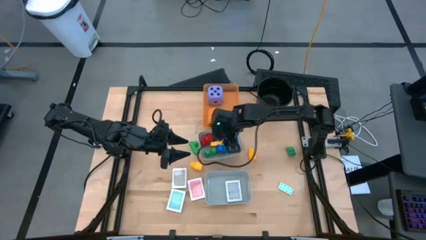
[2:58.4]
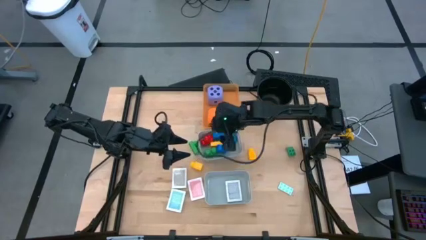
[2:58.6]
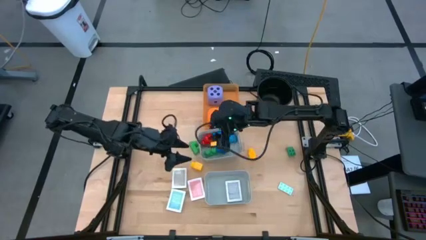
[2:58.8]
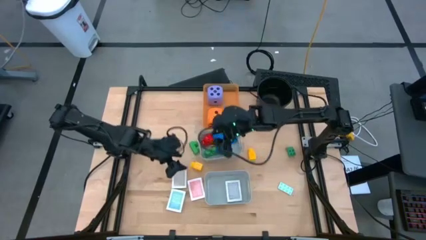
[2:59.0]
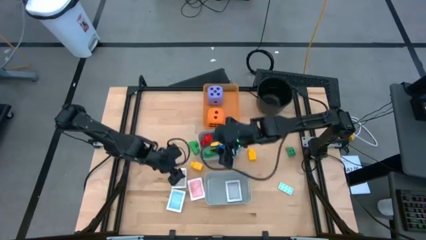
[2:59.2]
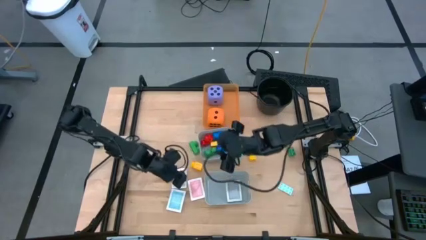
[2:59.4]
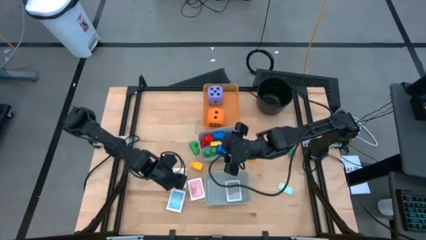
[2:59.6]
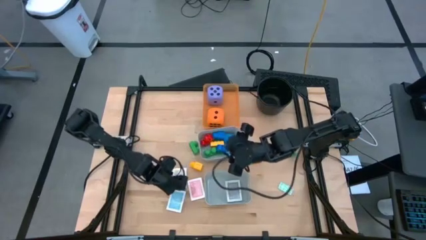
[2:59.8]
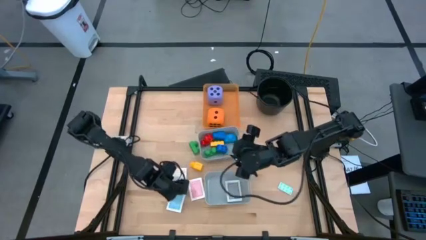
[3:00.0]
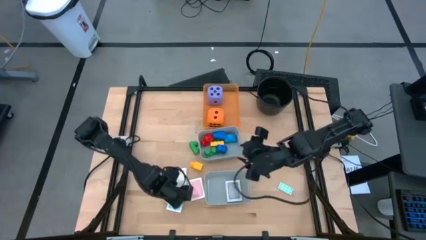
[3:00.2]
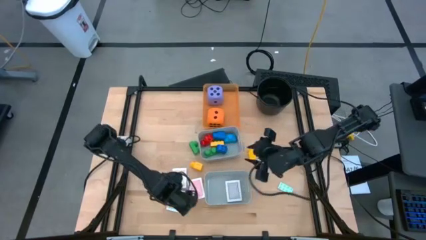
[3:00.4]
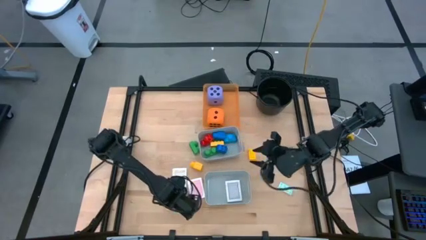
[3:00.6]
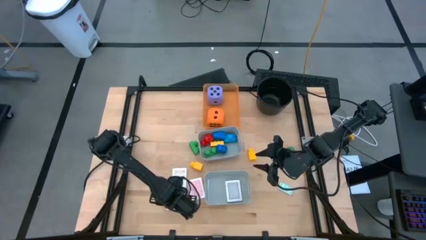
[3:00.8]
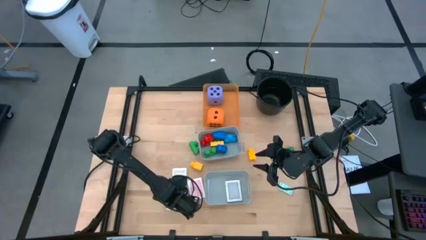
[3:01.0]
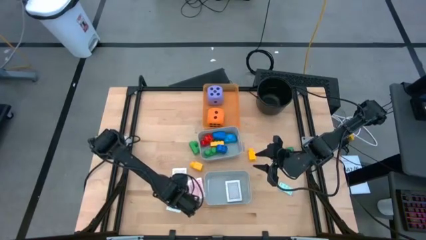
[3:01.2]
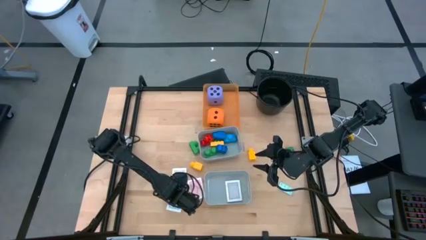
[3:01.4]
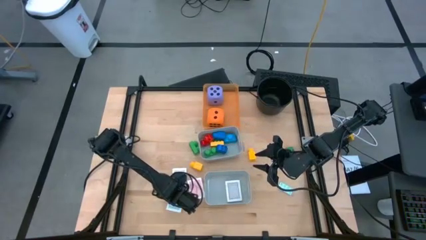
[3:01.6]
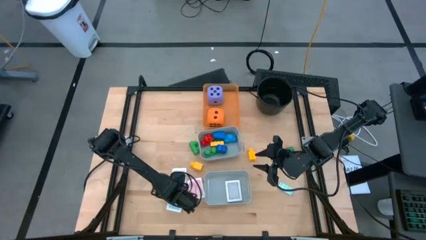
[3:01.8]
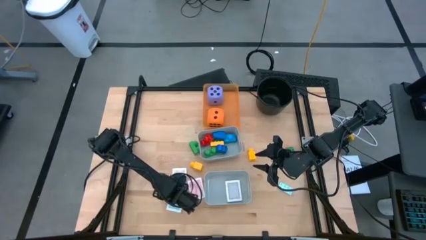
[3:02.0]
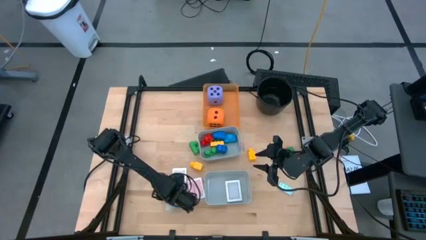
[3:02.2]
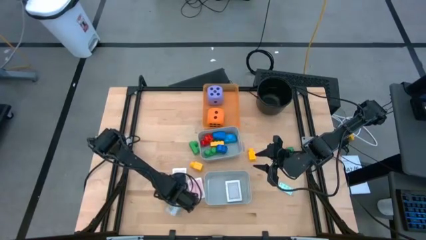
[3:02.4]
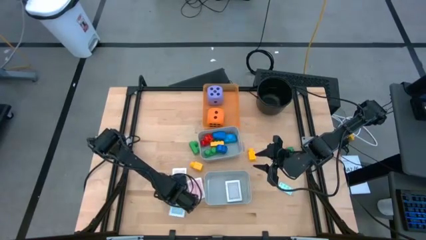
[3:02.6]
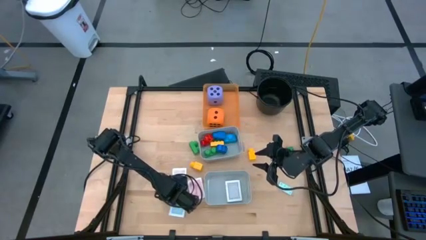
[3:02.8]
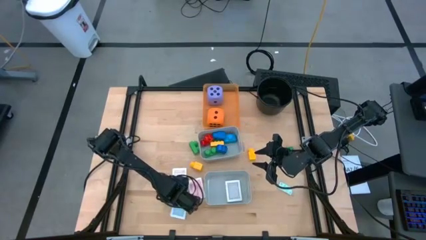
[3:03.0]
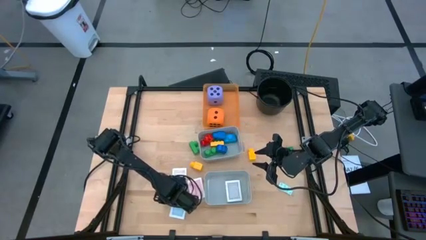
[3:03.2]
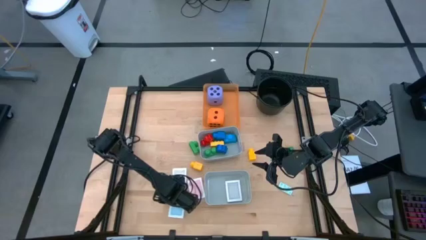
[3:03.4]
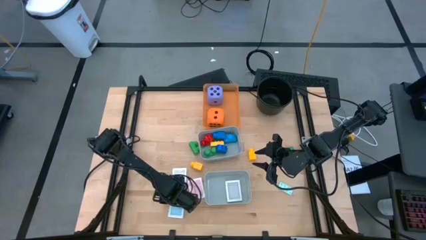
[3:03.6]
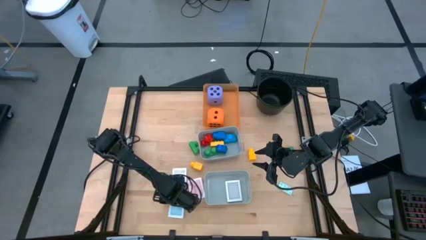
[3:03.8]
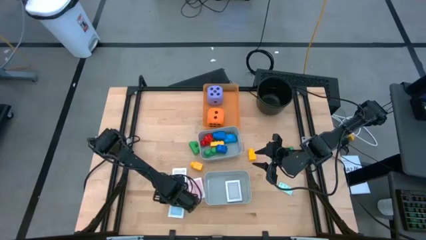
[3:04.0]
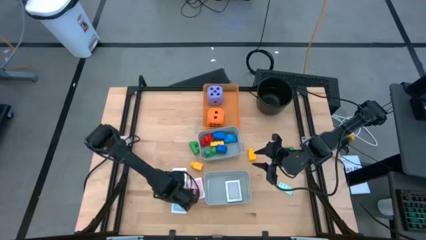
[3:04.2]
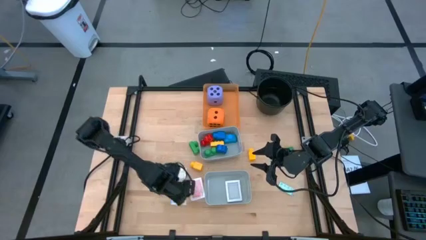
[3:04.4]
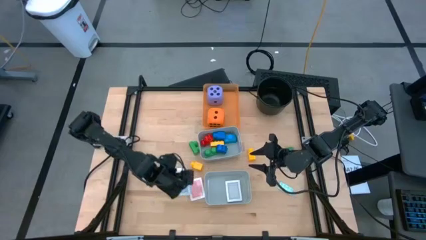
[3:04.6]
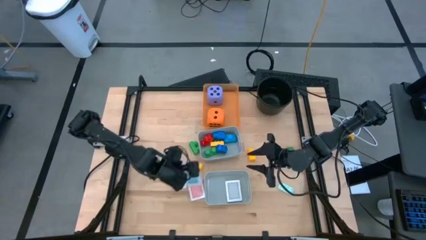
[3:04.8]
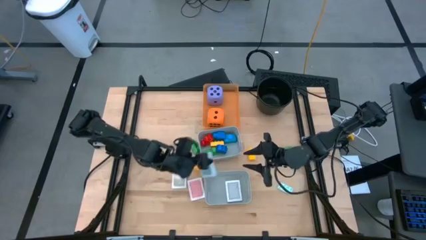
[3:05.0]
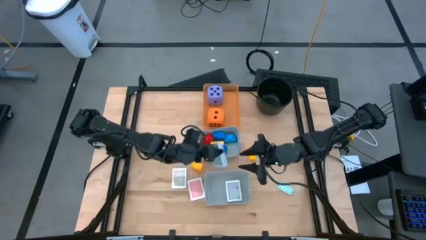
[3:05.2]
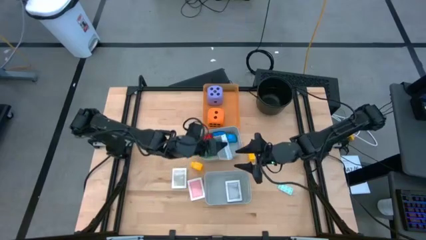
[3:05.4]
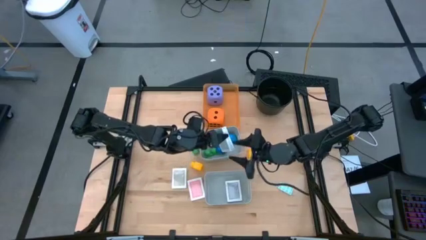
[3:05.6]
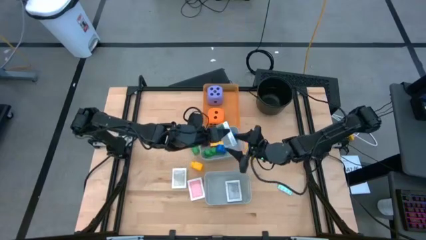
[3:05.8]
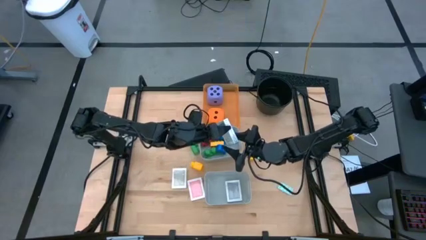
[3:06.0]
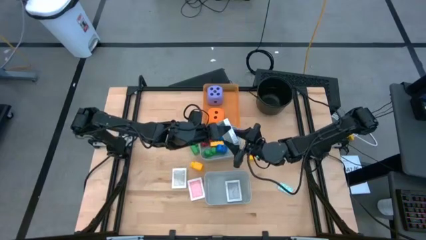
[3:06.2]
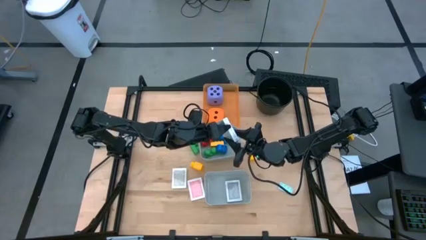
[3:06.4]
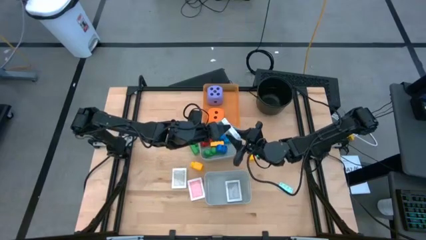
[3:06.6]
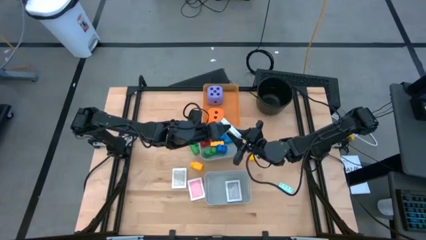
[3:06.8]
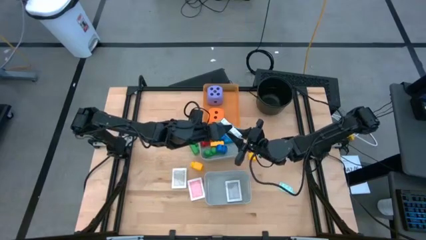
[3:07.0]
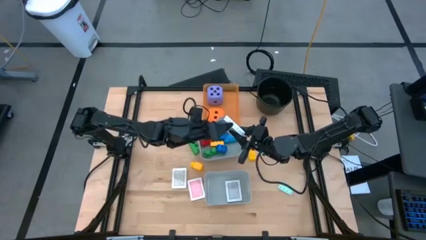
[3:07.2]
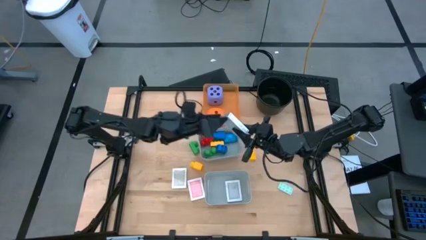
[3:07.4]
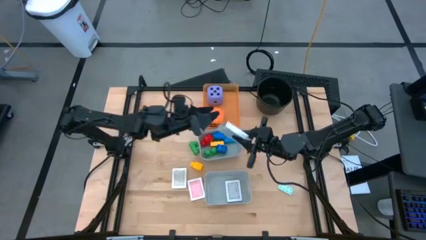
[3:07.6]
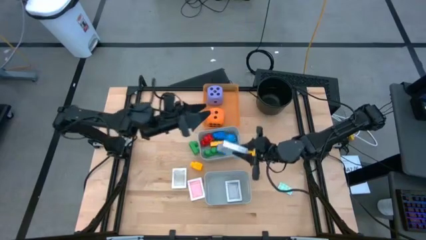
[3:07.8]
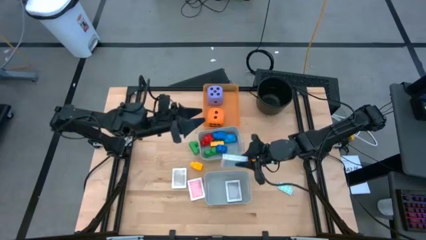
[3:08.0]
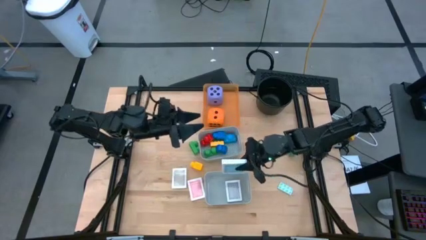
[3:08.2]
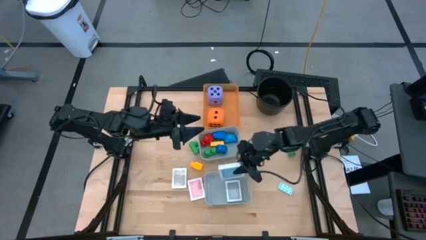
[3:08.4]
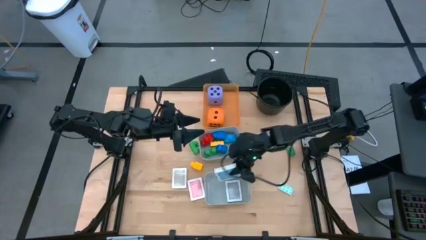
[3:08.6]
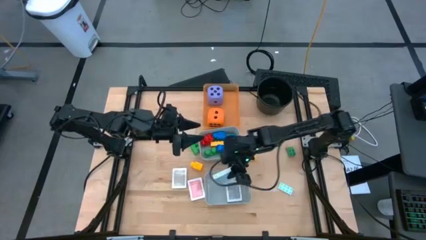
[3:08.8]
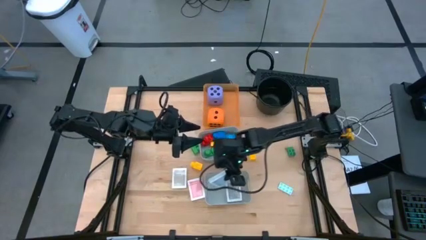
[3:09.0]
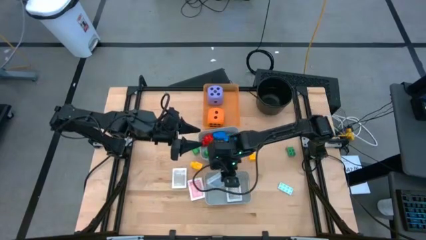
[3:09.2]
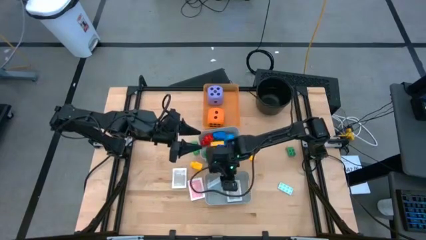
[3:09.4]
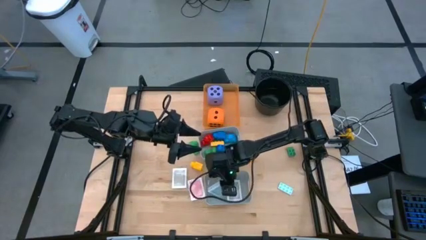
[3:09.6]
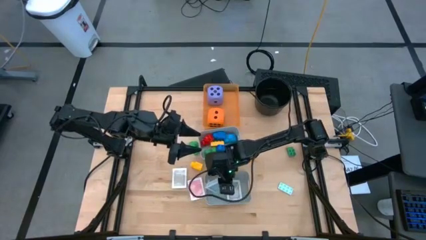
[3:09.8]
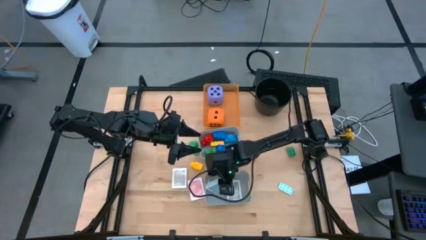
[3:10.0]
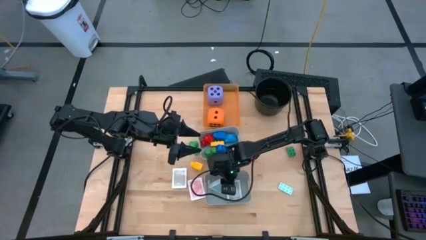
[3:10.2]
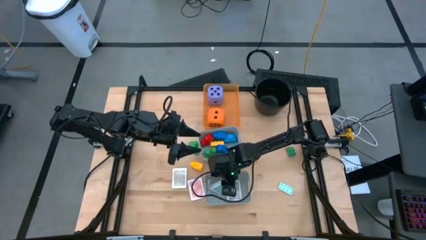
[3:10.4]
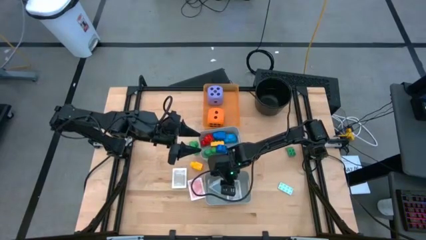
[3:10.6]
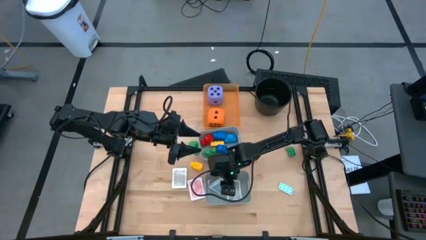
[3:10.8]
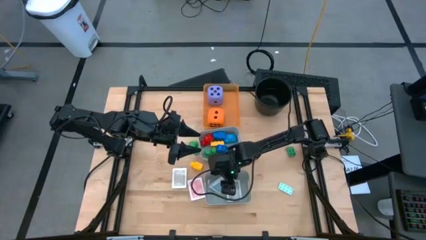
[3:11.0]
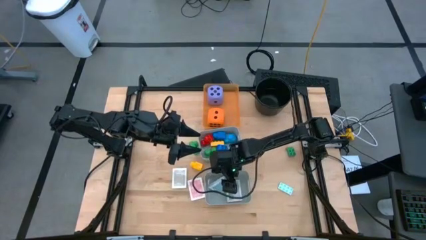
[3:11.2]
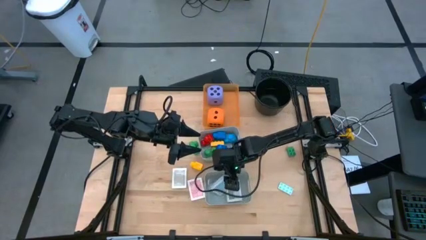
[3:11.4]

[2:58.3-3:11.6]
Task: Pick & Place Toys
Put the white and blue and green playing card pack into the bottom gray bin
